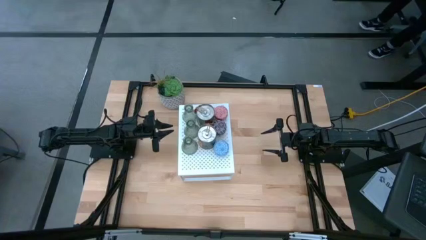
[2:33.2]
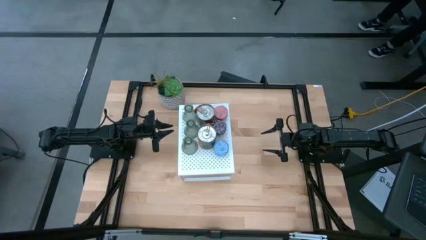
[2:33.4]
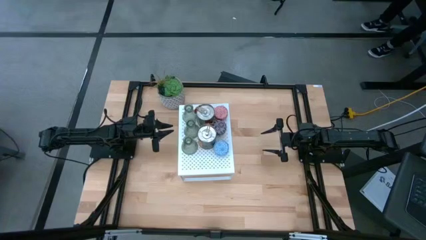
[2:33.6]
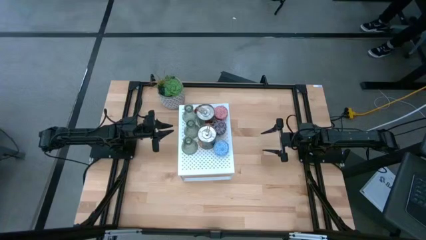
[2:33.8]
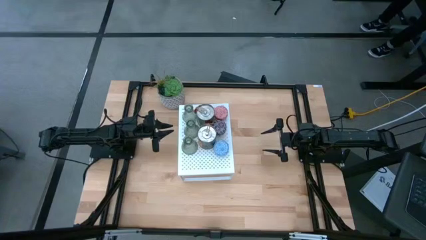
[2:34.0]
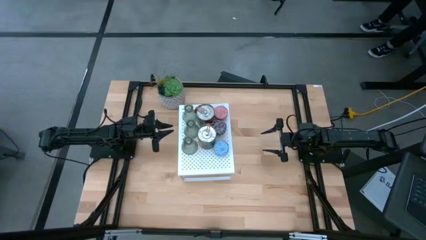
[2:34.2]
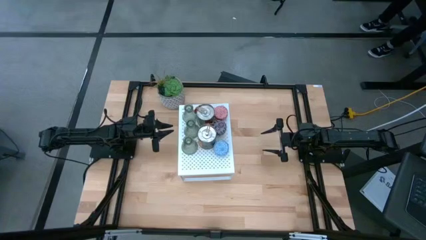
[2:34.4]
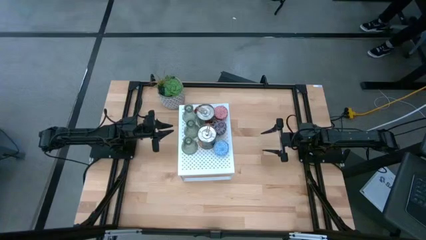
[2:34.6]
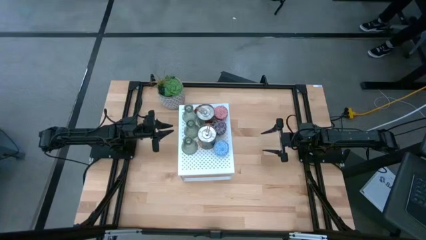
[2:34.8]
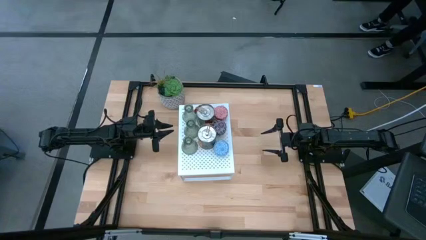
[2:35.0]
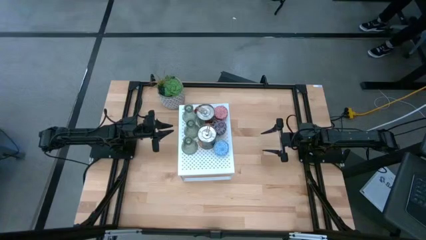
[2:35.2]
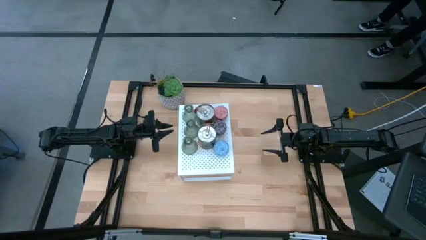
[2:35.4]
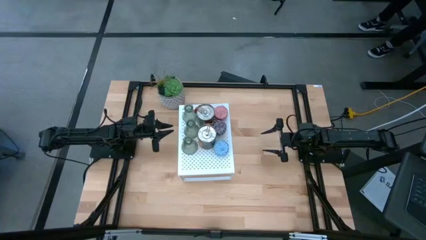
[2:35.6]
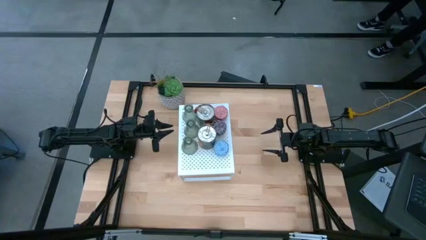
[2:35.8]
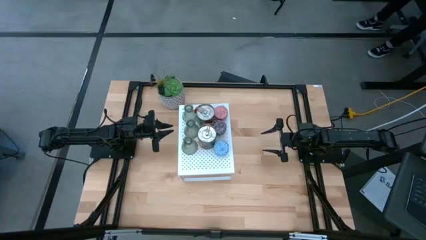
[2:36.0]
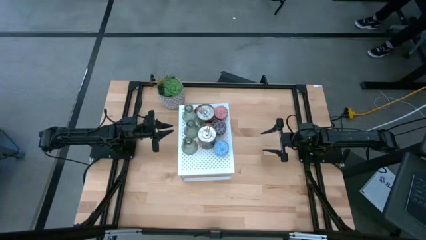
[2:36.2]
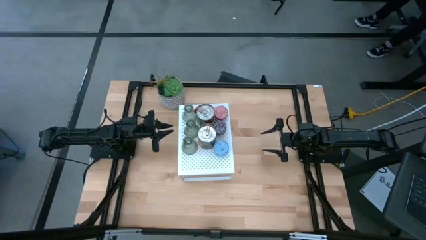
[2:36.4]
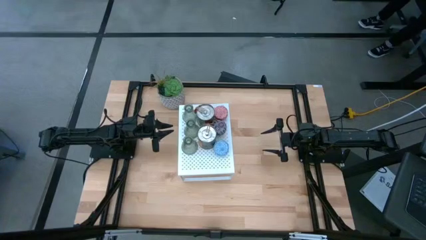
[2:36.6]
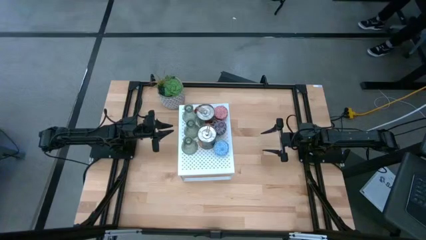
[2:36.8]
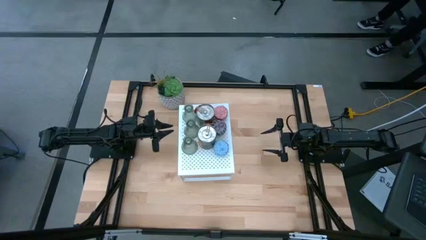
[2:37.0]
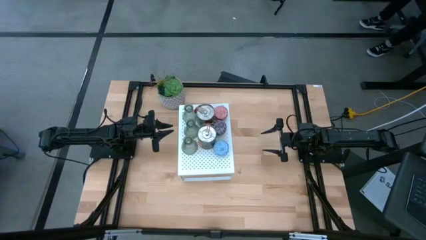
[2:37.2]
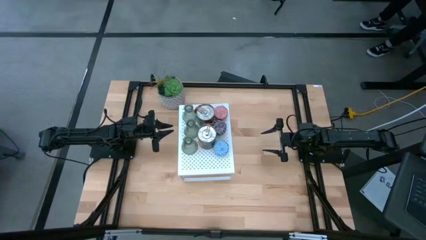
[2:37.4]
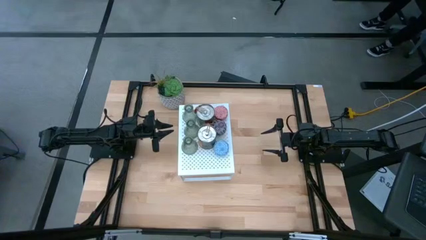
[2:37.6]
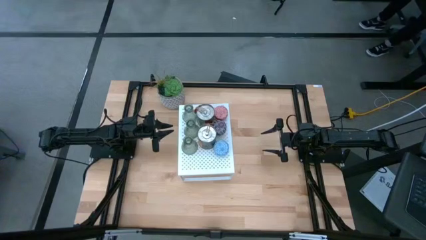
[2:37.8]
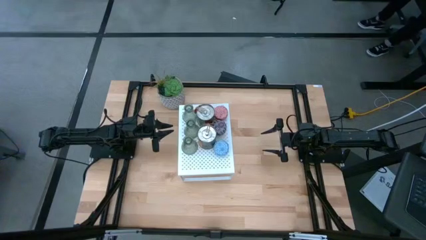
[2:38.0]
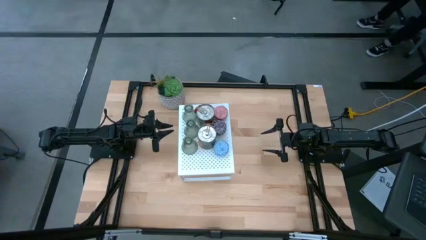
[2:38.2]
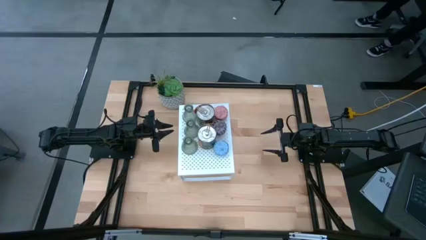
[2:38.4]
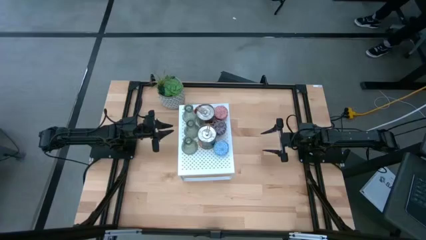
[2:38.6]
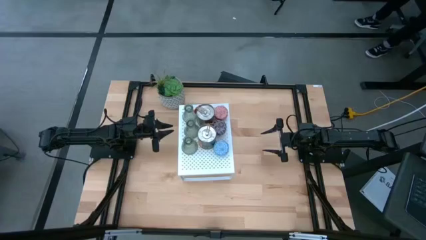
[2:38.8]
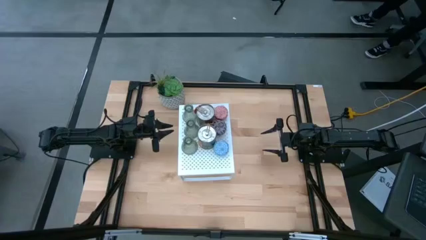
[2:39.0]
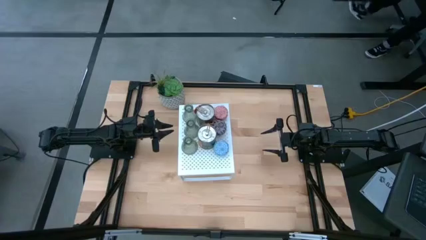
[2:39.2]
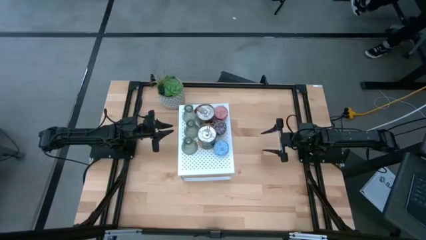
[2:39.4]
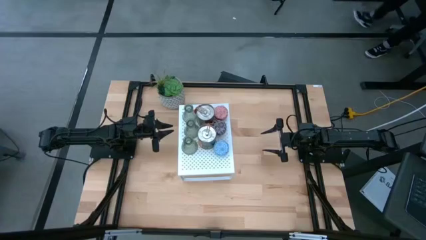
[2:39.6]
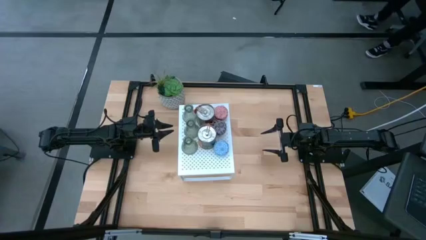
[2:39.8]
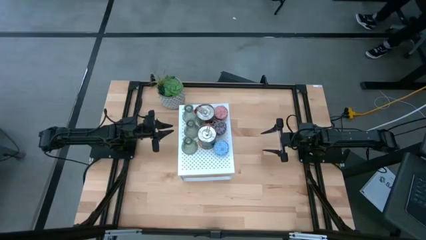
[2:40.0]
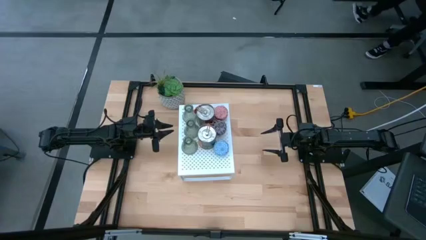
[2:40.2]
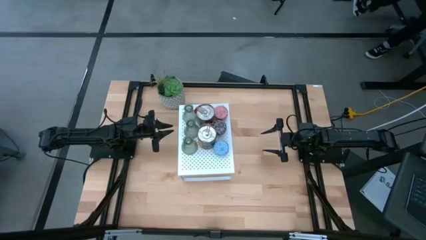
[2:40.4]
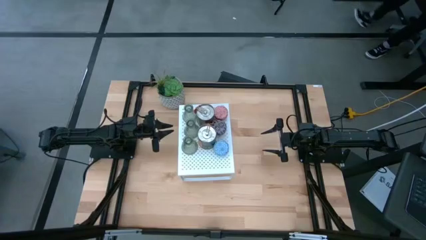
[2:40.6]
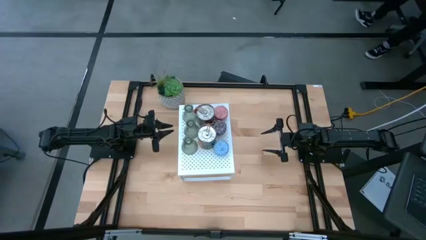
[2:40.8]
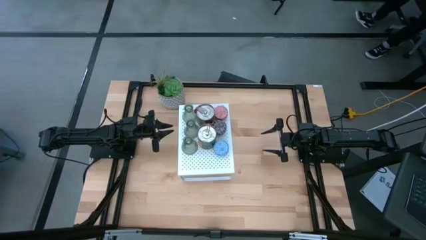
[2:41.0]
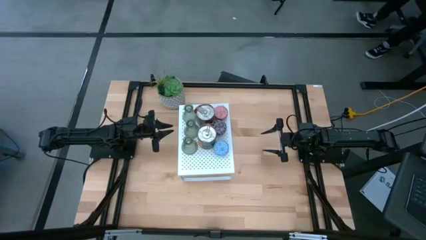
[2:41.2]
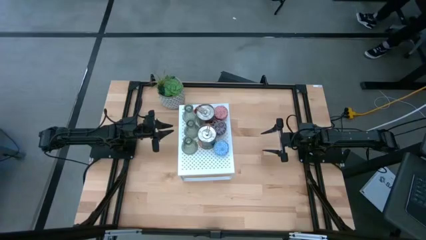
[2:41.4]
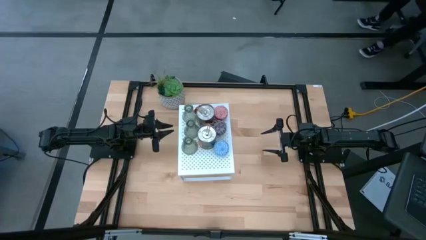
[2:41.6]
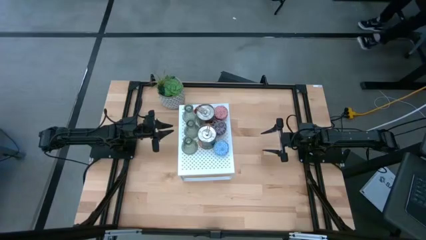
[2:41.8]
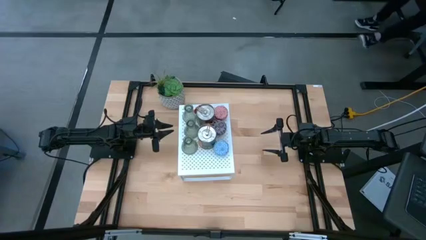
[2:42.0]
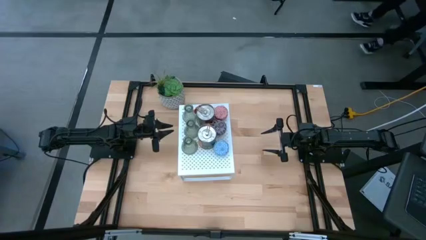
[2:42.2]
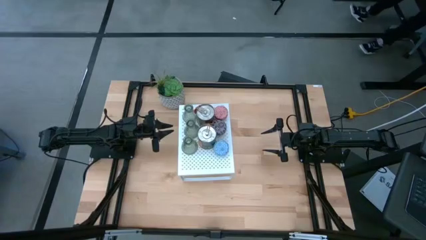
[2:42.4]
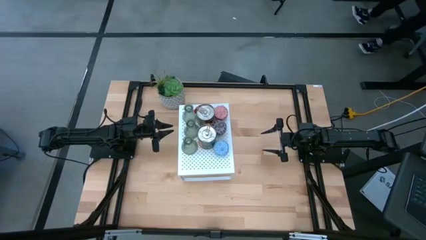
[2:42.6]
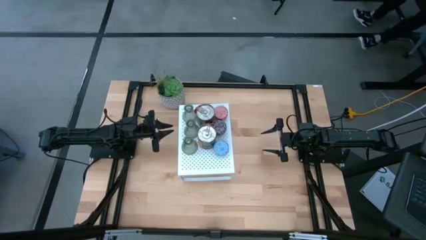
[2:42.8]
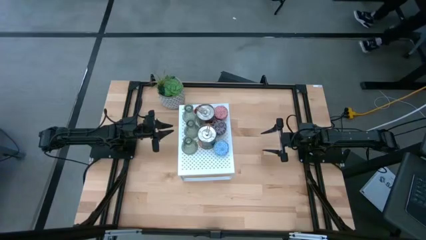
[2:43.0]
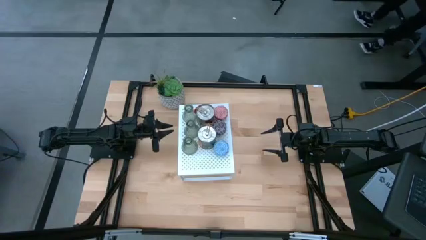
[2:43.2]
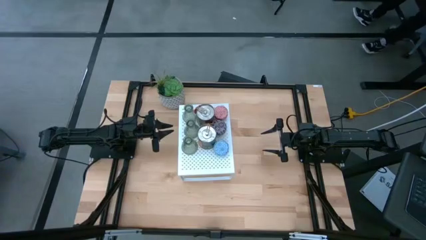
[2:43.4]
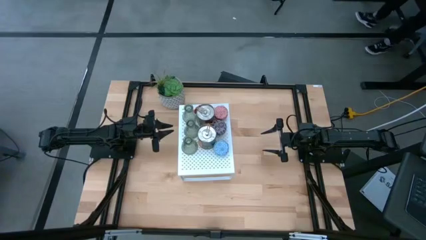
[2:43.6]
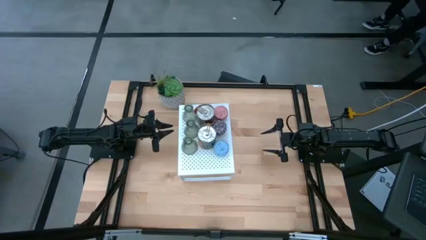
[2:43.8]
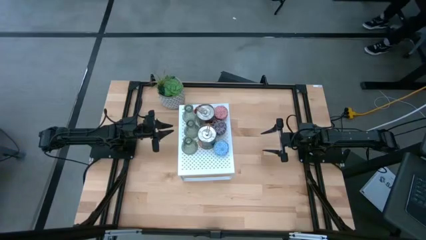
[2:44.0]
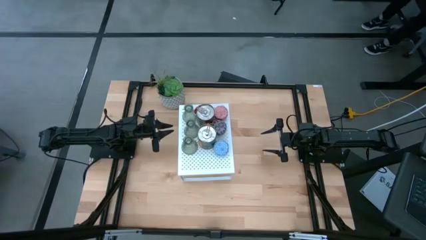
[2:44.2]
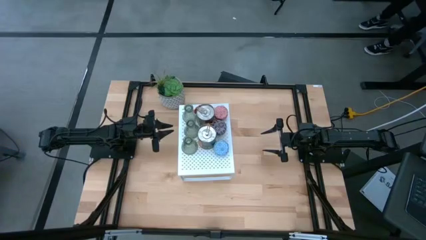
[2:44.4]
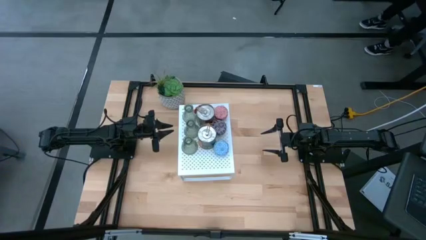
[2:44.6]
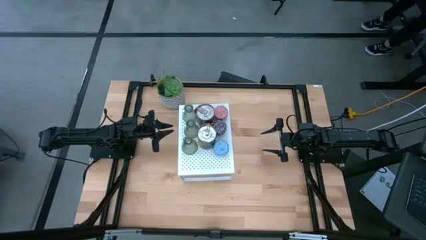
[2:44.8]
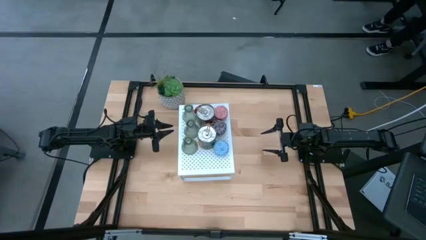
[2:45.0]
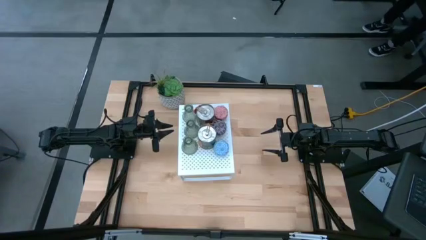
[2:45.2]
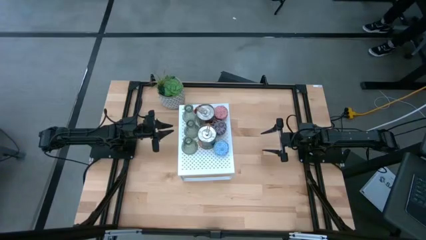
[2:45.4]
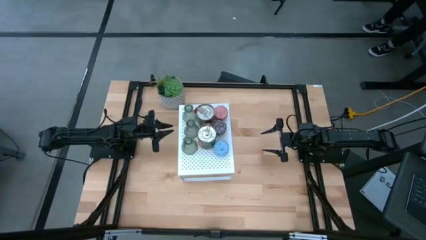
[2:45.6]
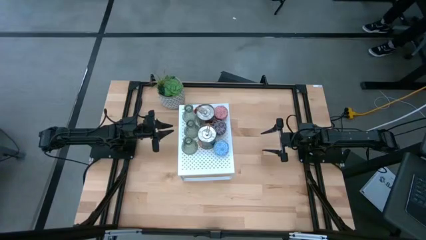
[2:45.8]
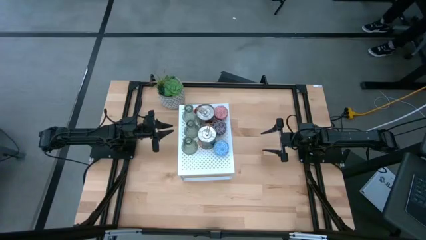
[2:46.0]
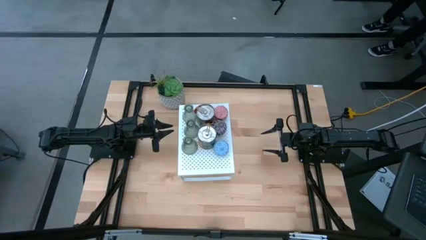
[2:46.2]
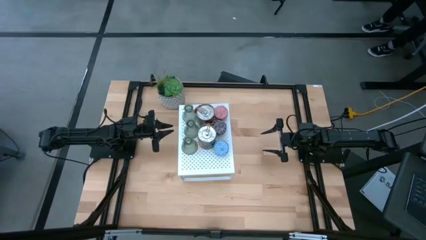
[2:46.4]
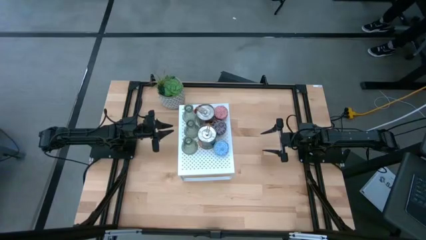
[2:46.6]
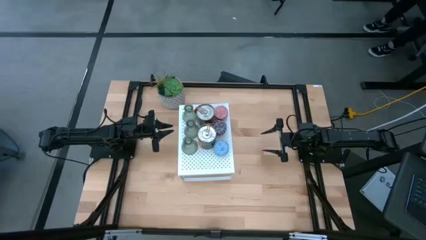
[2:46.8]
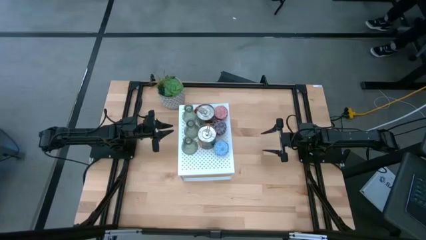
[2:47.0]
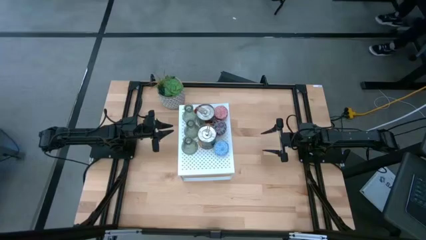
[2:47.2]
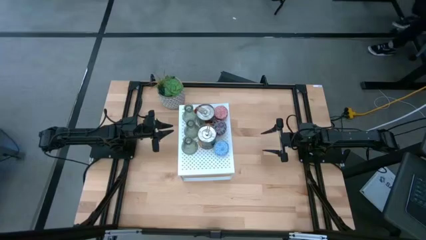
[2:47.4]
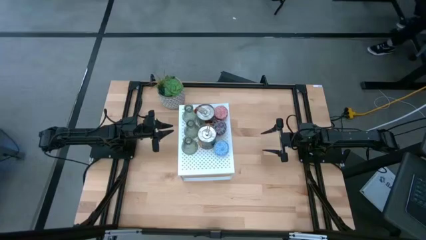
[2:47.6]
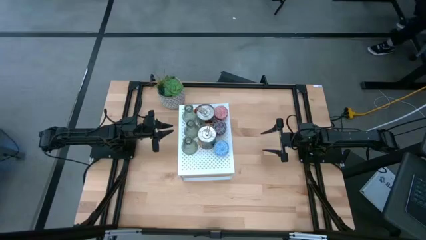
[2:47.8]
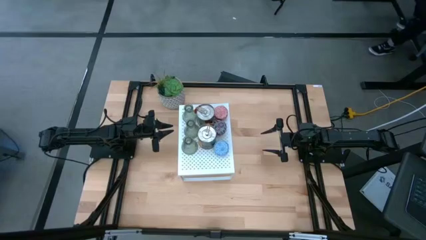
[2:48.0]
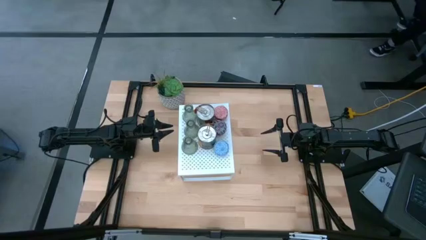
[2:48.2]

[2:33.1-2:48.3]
Task: Pick & Place candle stick holders
Return to Home Position

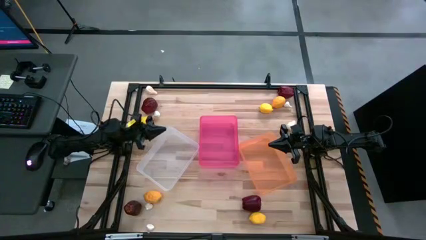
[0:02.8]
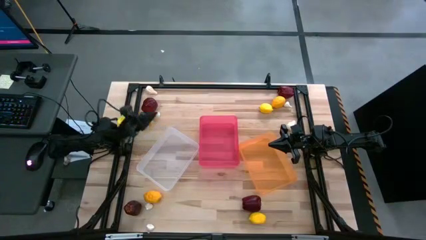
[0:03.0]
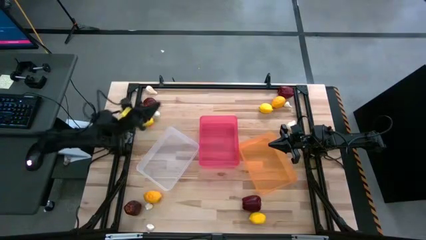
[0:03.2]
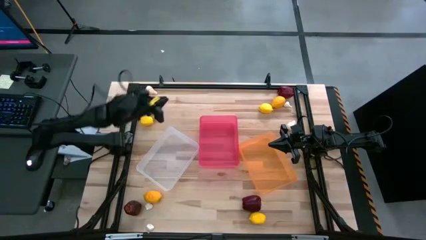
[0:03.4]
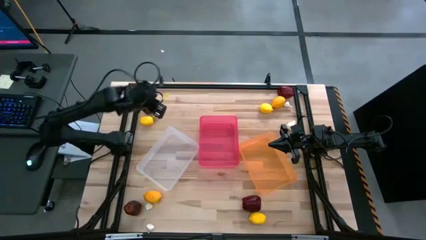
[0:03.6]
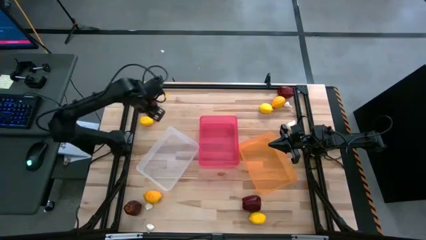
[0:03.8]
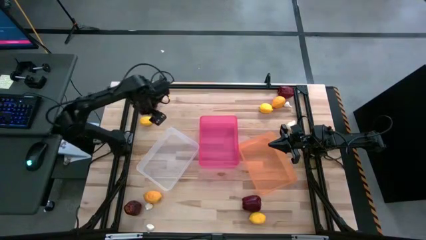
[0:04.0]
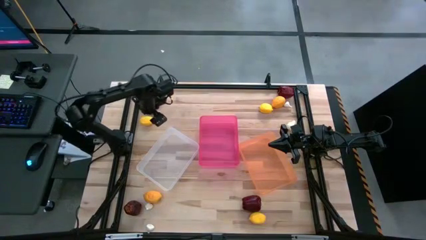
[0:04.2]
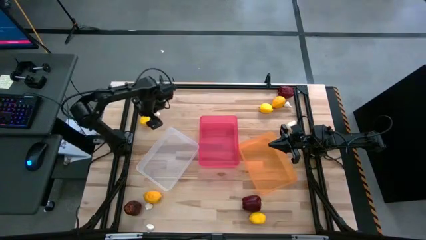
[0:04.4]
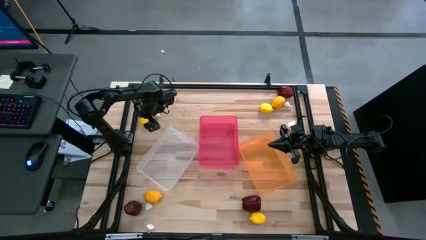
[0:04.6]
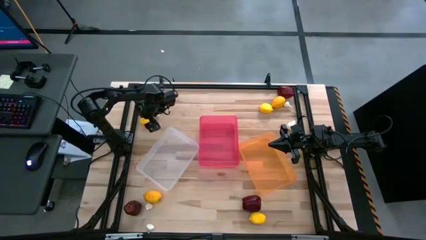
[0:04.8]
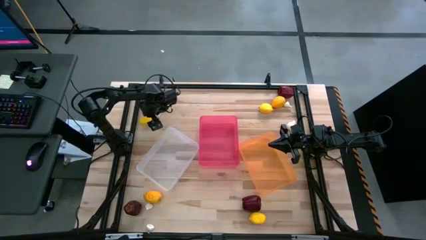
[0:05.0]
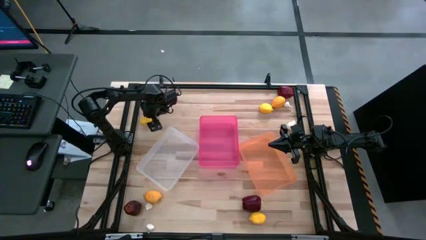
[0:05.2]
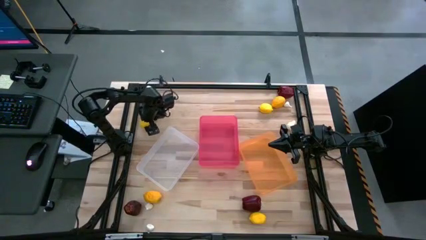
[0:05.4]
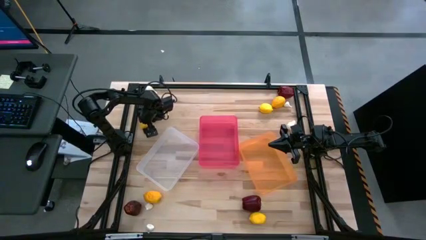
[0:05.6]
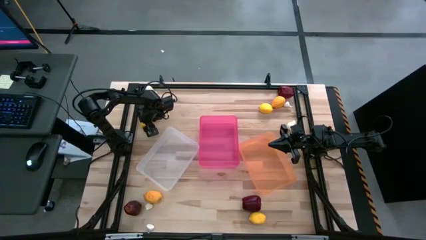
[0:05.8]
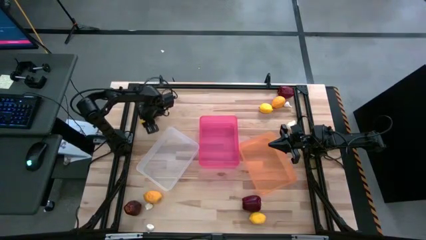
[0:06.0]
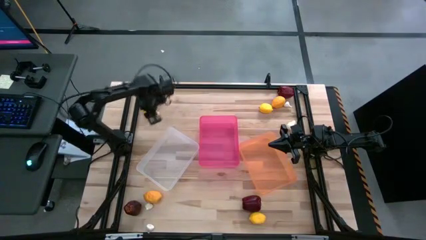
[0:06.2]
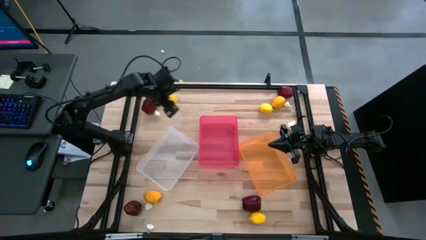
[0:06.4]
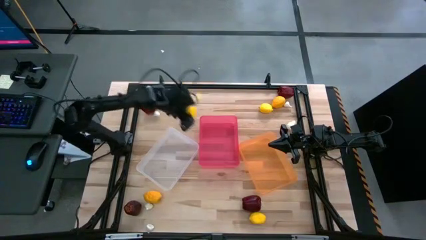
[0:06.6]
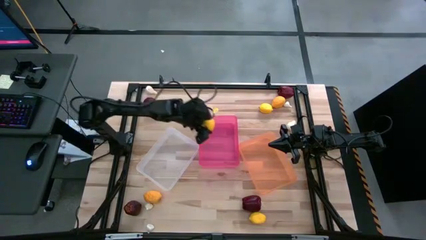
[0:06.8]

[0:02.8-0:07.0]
Task: Sort produce into baskets
Put the yellow lemon into the red bin
